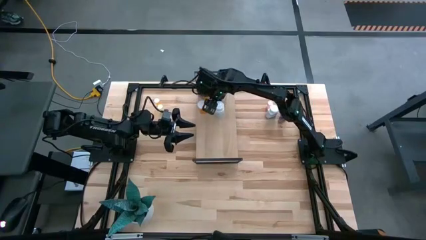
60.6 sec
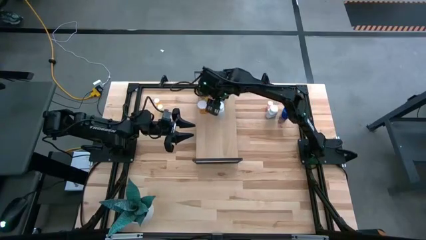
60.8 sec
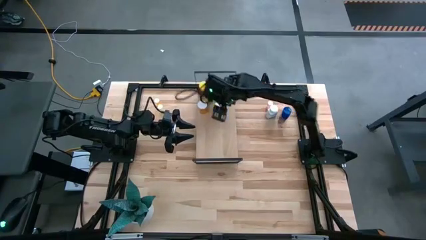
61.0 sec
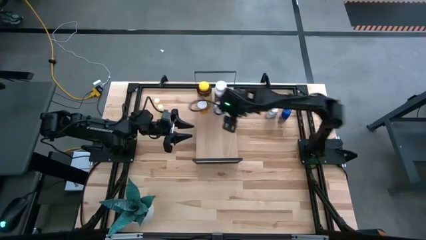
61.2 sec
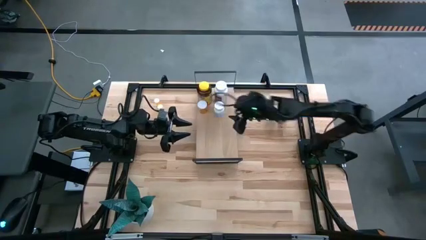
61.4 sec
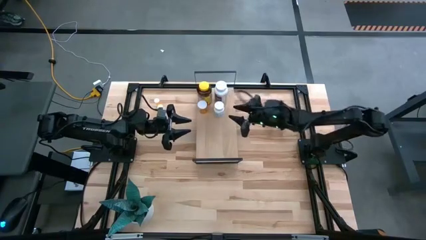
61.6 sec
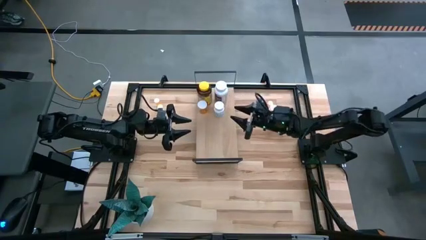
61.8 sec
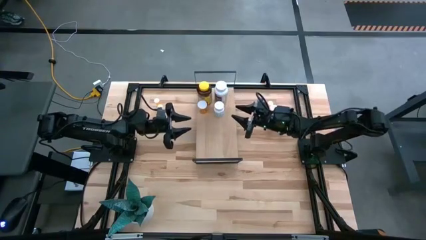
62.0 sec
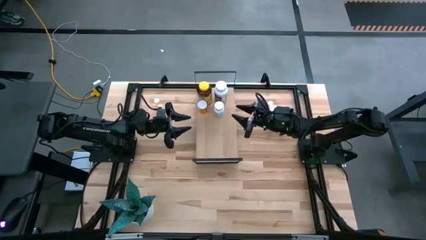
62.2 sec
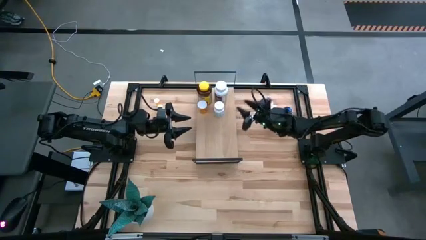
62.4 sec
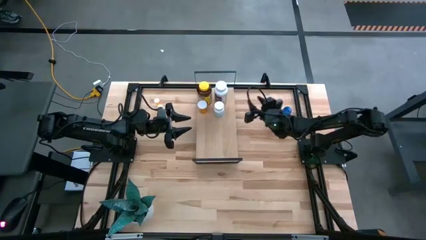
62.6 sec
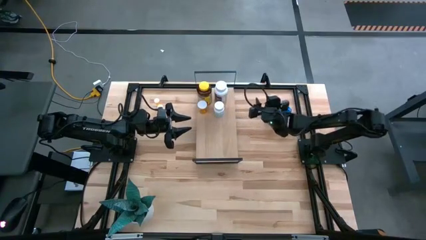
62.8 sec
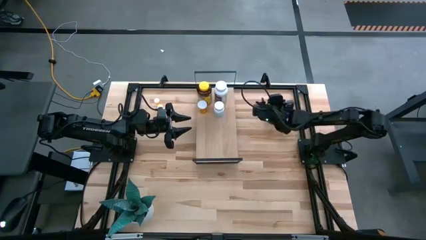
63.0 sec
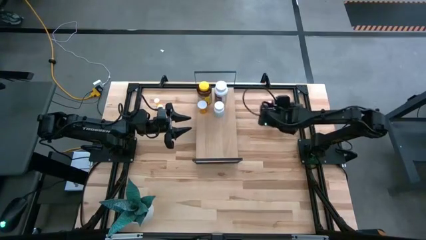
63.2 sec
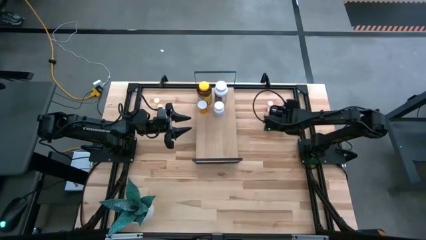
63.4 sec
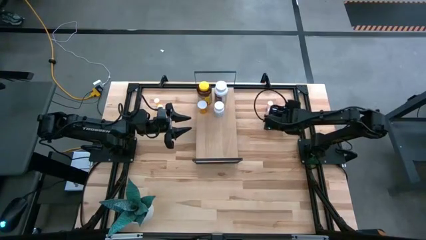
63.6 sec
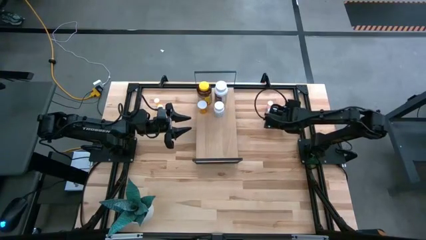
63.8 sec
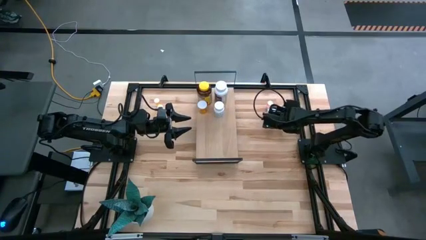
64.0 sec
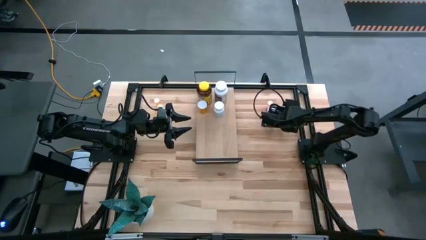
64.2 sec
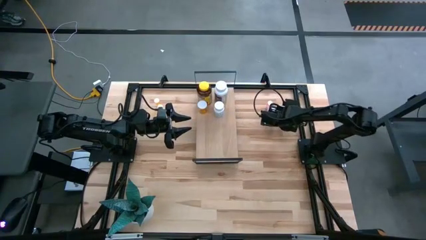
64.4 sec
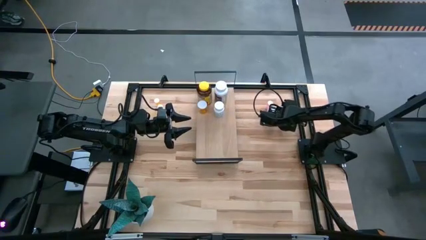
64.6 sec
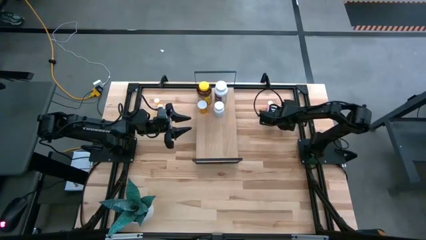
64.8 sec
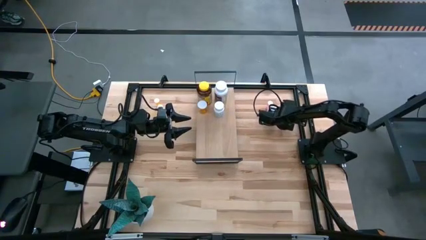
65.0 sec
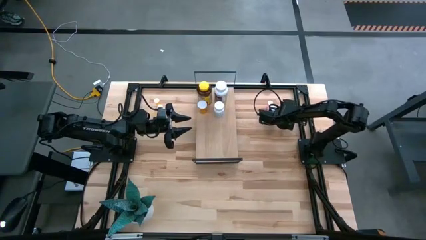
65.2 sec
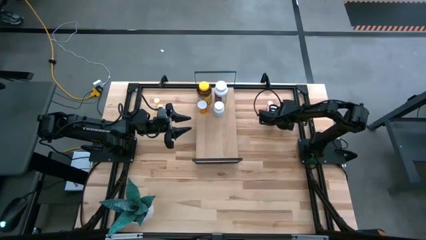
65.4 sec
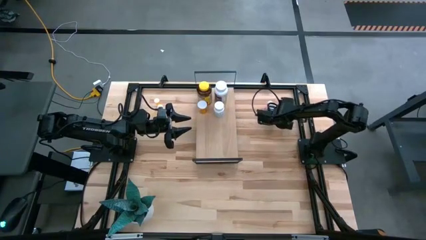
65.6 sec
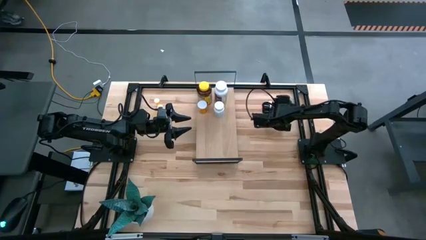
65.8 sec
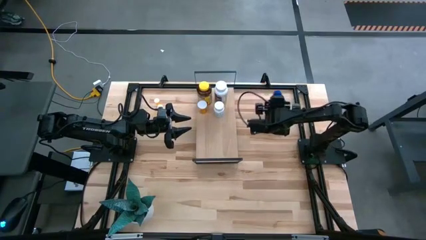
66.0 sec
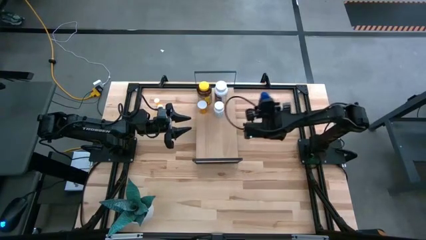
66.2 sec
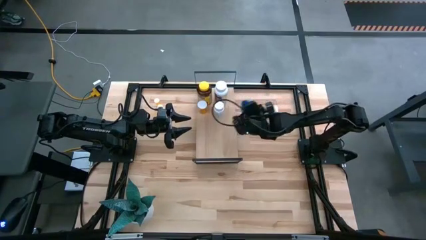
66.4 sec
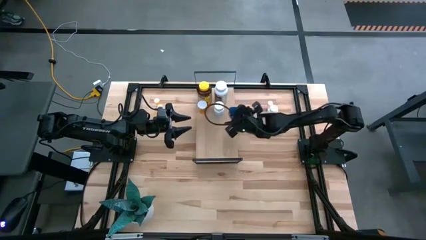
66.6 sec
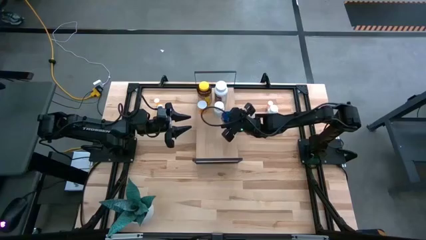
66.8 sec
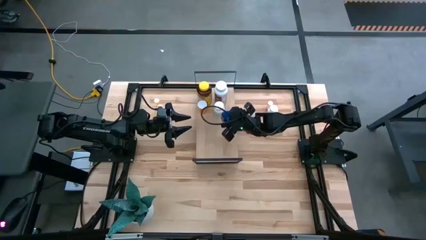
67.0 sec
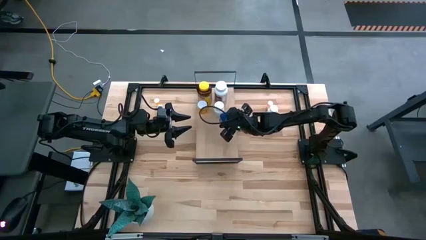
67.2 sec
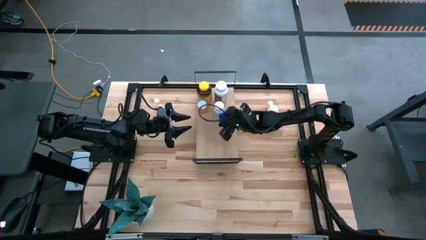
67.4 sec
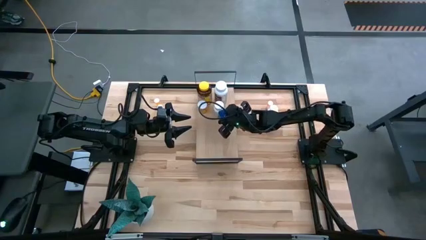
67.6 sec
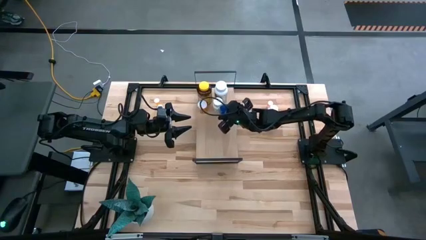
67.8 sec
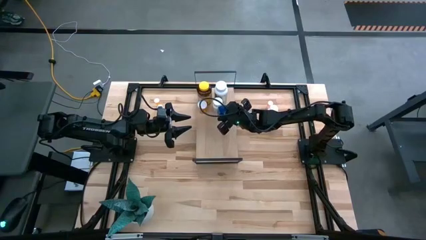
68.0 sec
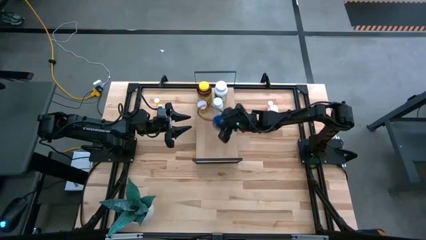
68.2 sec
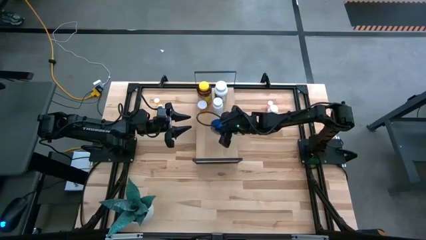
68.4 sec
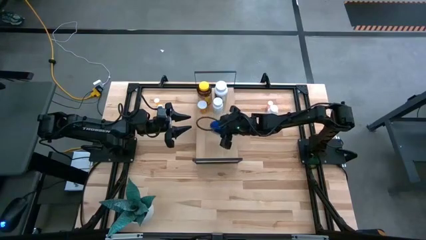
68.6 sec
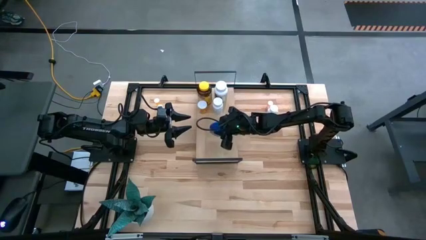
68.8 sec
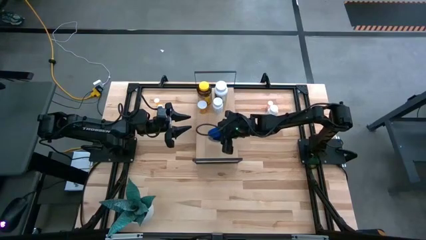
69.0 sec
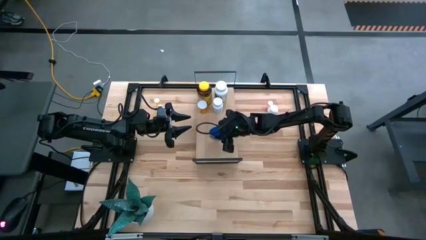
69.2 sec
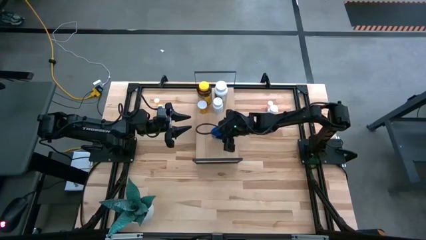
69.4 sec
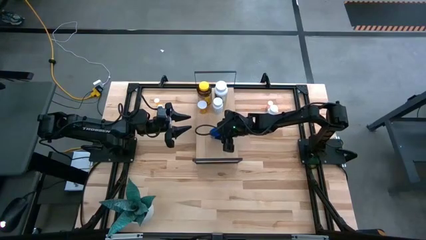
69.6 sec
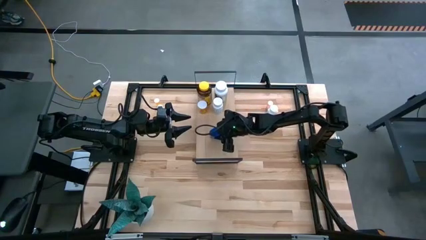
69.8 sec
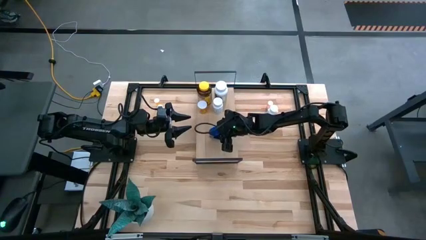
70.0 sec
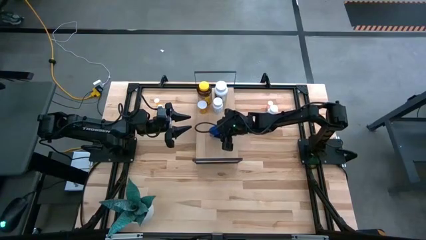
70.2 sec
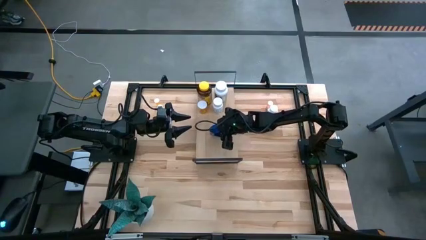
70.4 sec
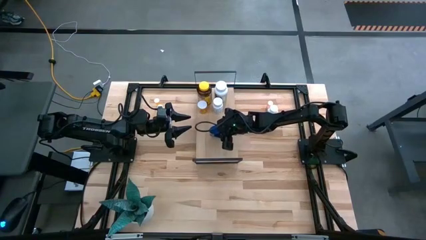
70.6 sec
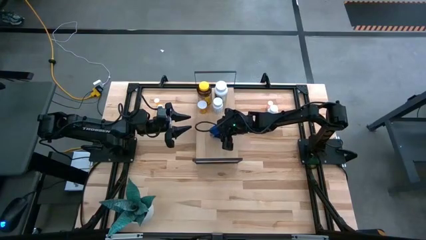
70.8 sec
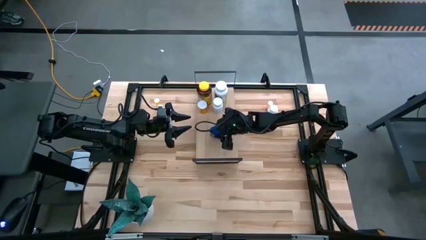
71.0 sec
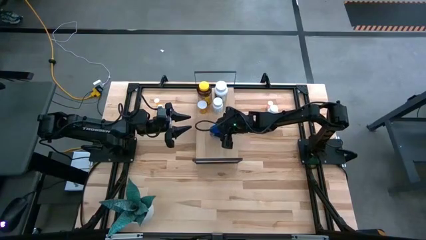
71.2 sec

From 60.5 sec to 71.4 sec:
Task: Pick and place medicine bottles onto shelf by color
Put the blue medicine bottle on the shelf

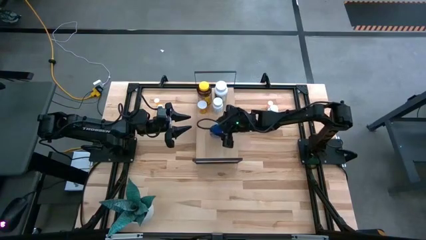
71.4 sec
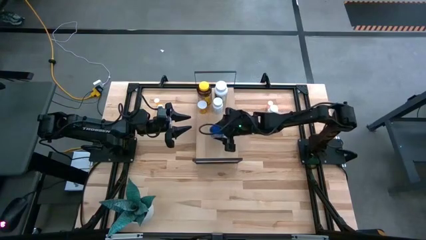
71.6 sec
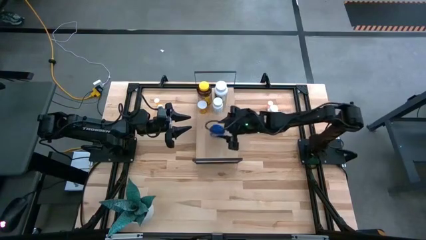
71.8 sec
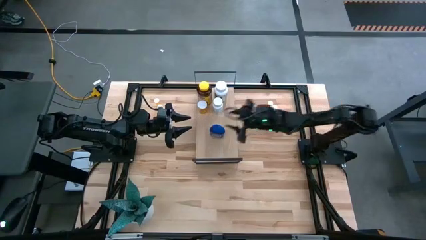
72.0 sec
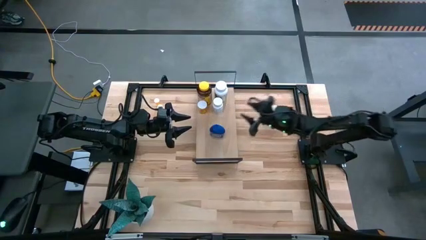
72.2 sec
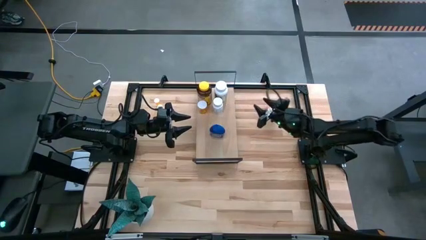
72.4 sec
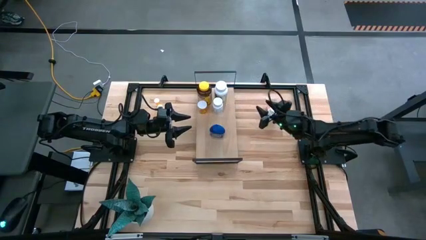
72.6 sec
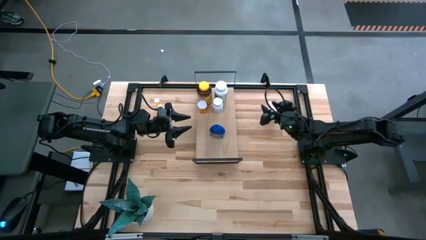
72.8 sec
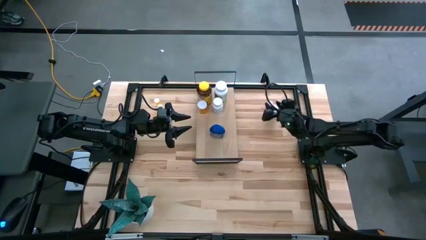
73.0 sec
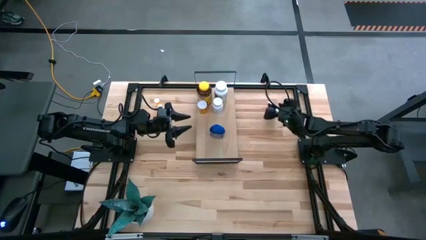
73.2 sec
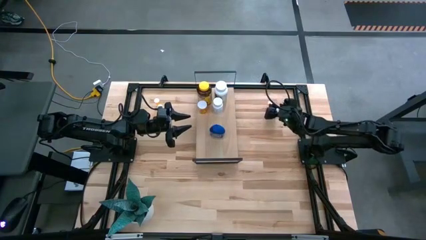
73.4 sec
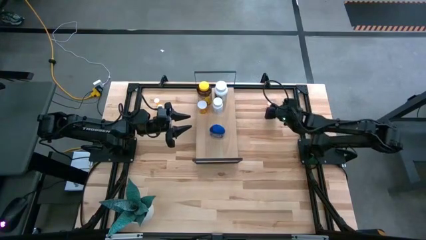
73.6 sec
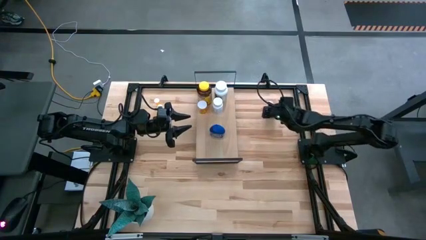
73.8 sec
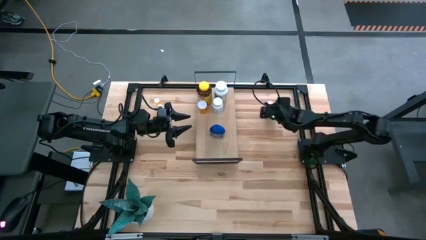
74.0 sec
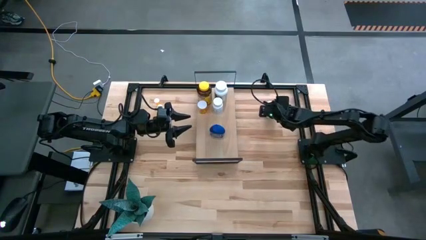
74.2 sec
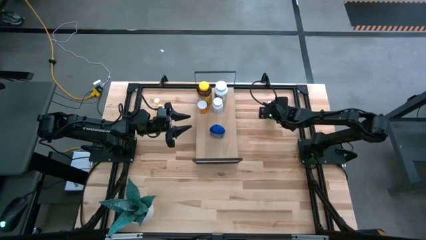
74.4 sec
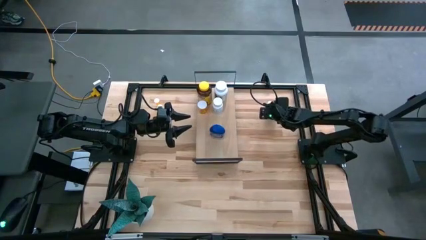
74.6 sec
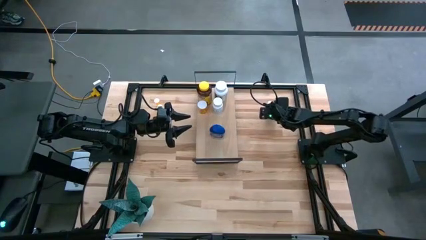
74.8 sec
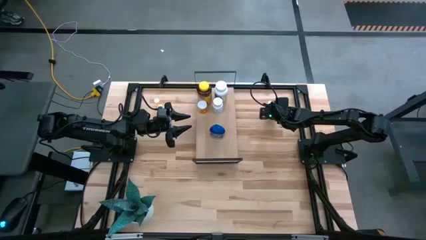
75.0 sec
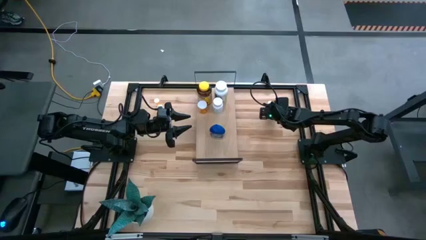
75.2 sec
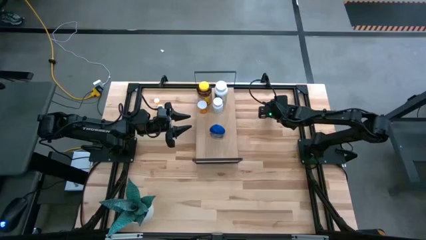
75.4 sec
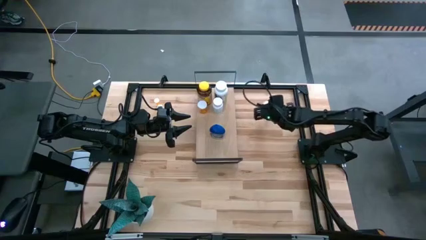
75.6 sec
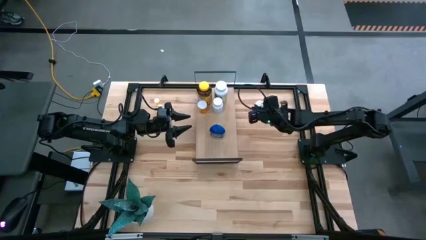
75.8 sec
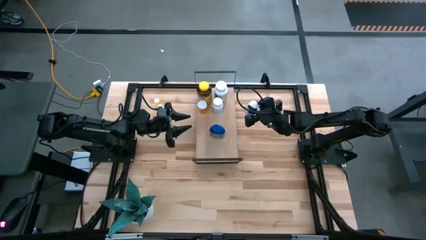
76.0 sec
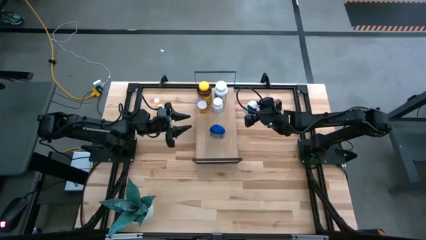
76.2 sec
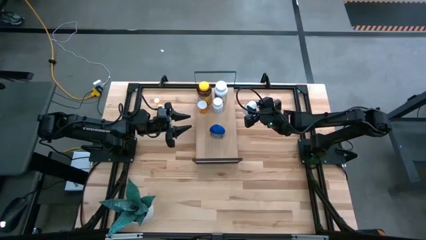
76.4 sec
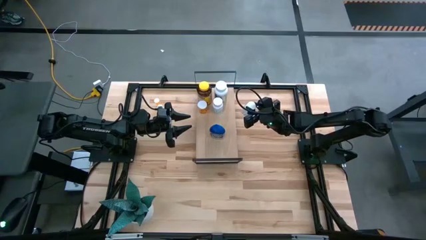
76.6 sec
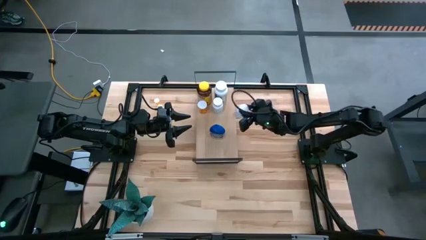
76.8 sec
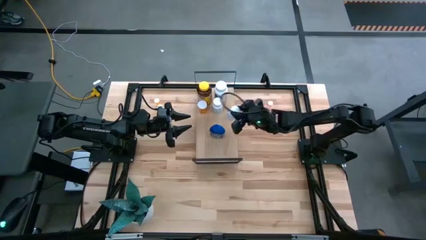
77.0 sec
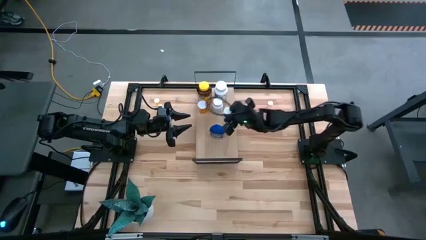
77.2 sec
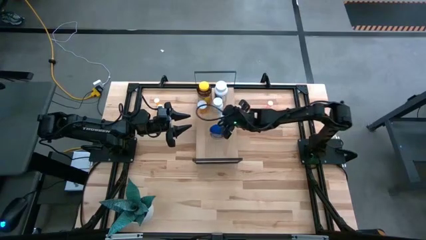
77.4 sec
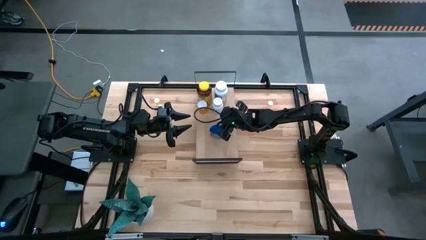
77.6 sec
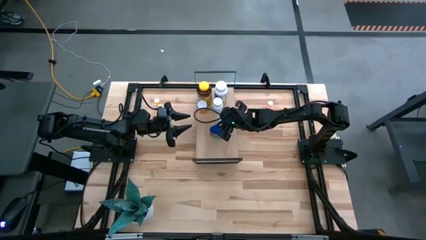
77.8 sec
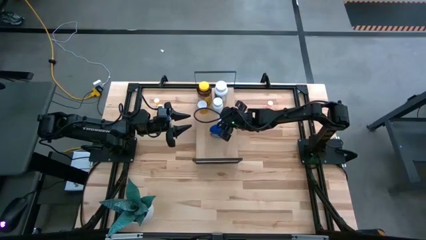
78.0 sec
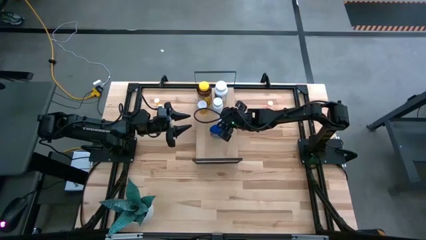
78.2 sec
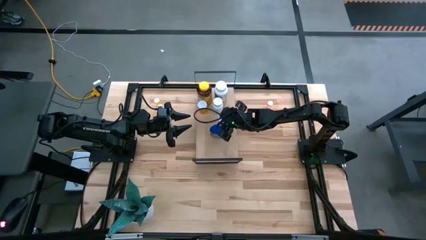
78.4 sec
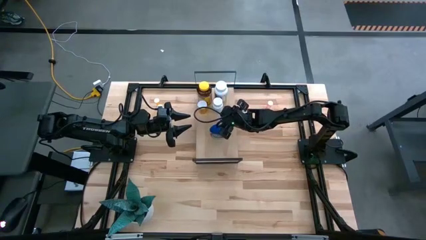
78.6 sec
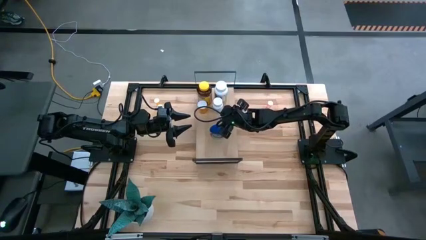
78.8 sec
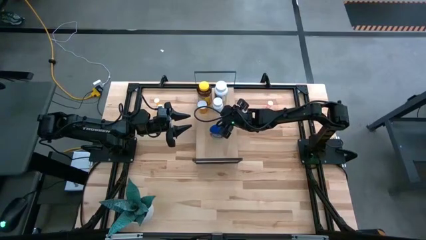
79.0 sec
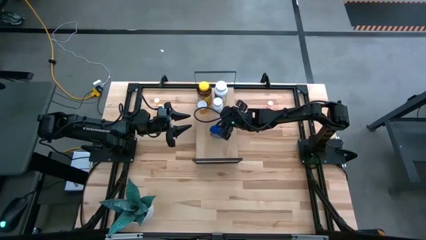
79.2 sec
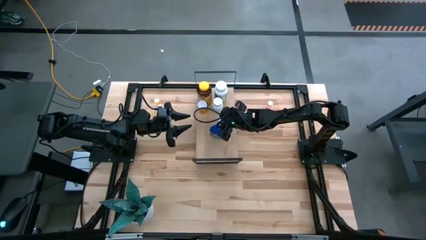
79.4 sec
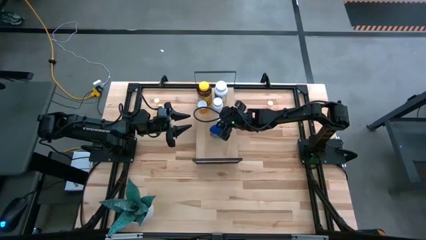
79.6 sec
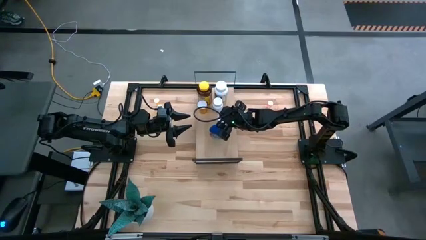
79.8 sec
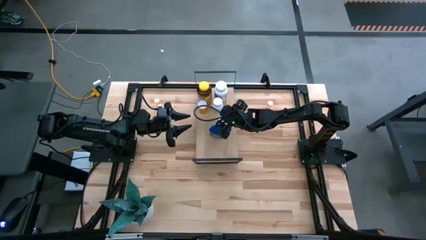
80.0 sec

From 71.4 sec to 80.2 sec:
Put the white and blue medicine bottle on the shelf
